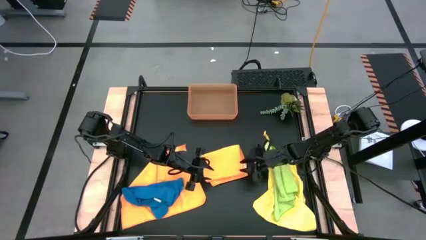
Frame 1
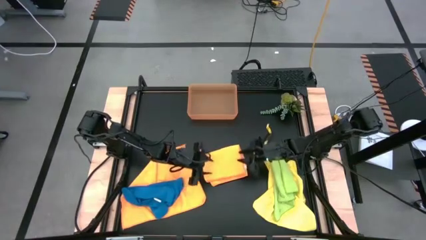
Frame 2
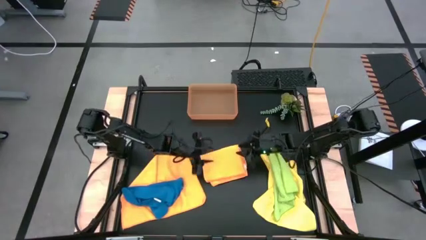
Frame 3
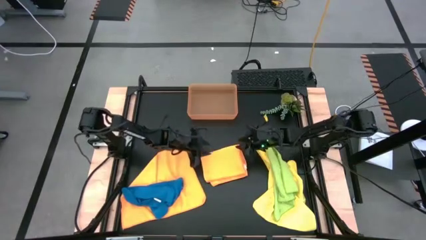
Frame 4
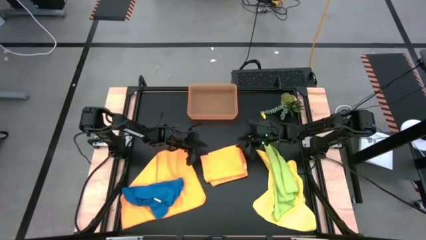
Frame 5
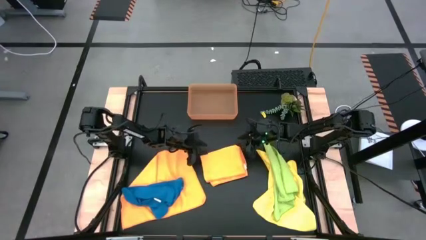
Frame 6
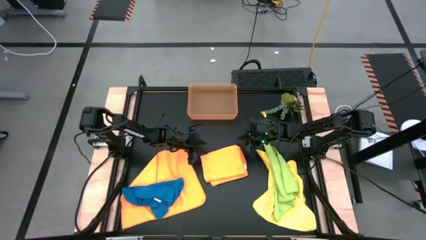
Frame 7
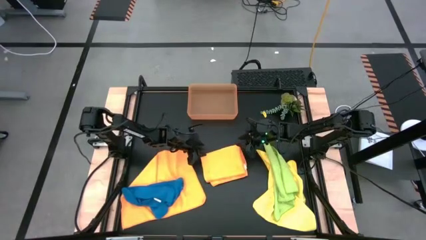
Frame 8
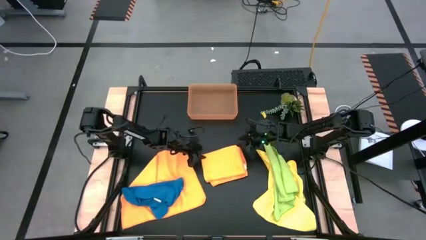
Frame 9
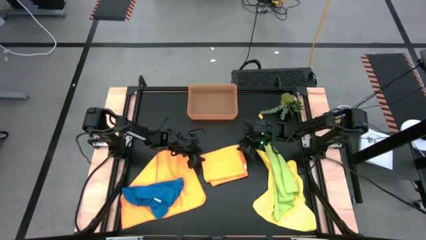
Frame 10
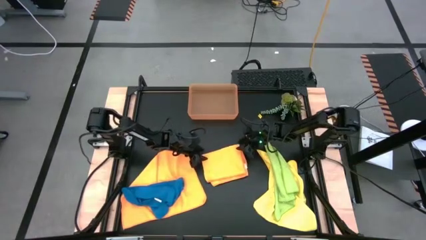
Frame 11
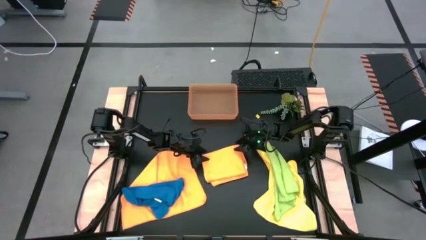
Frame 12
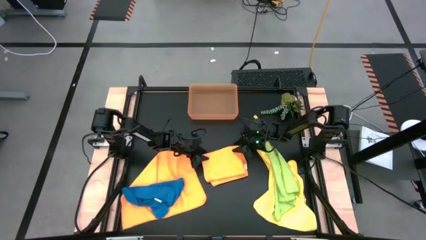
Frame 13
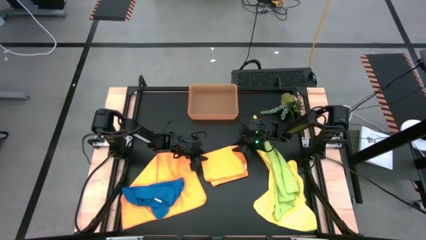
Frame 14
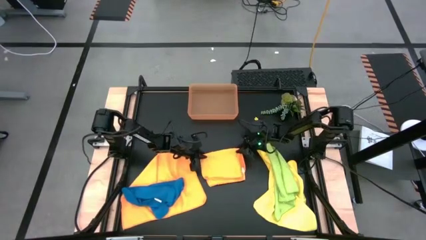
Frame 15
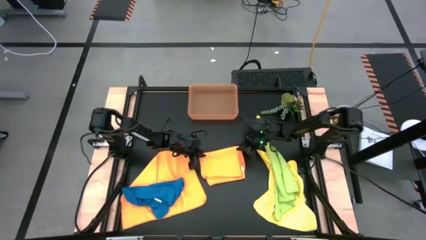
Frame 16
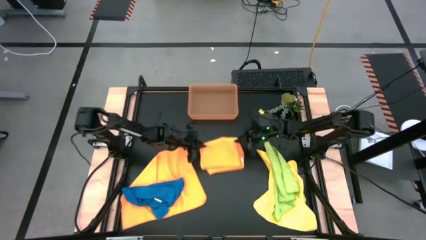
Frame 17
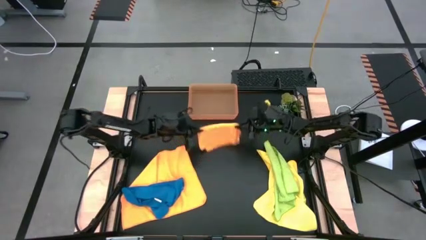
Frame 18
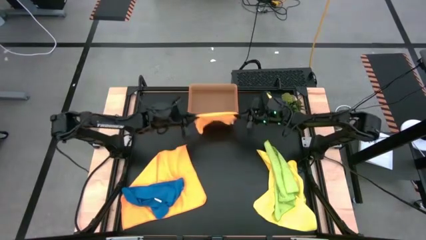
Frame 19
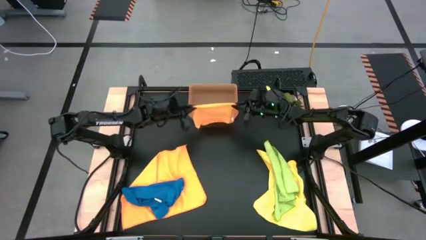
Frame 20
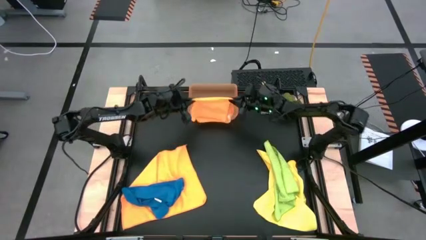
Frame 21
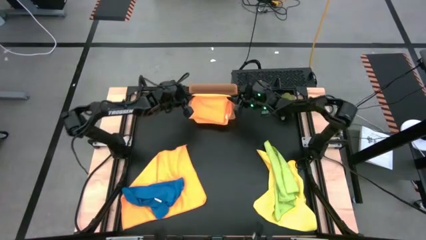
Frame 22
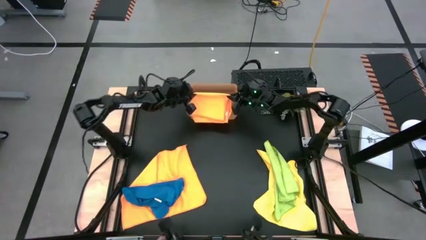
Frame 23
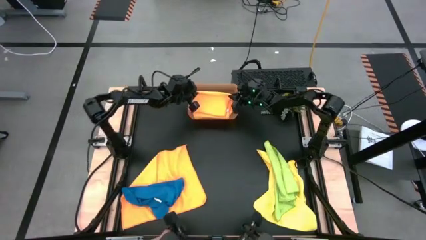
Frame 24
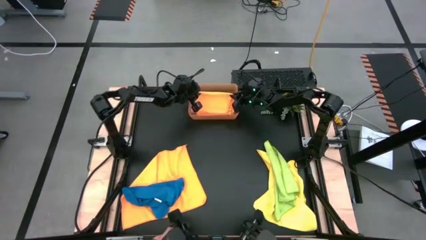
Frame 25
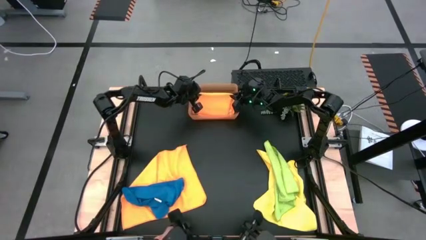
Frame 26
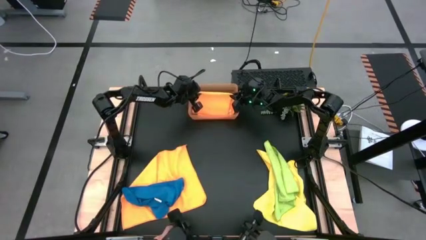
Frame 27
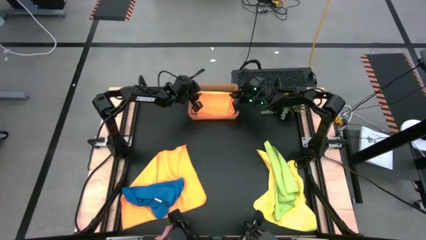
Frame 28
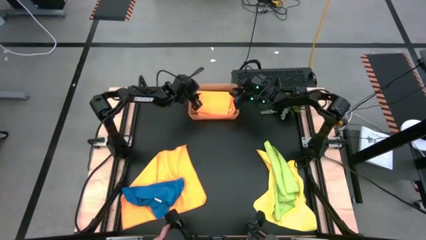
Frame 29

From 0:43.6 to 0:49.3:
Task: Fold microfiber towels
Put the folded orange towel into the orange bin

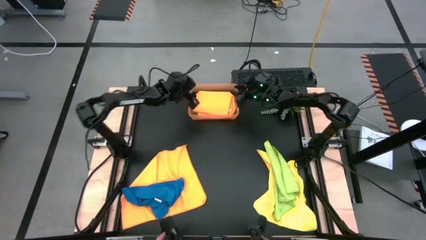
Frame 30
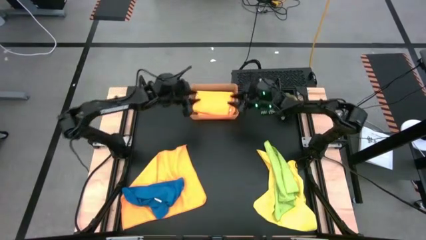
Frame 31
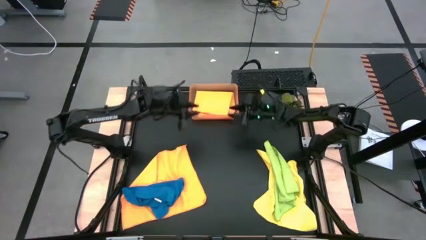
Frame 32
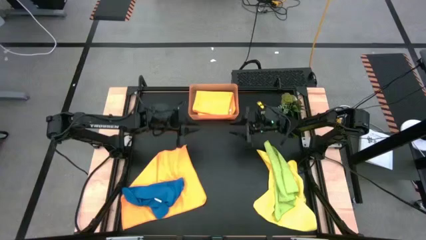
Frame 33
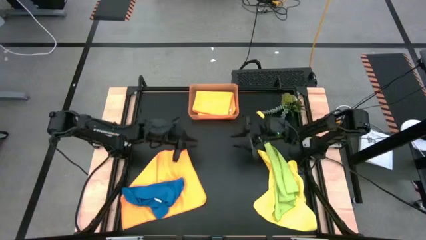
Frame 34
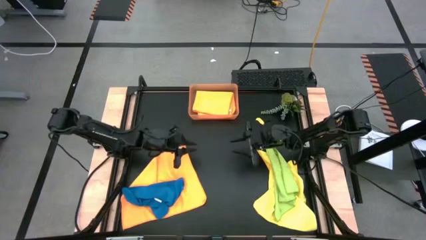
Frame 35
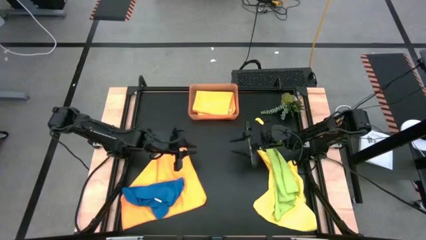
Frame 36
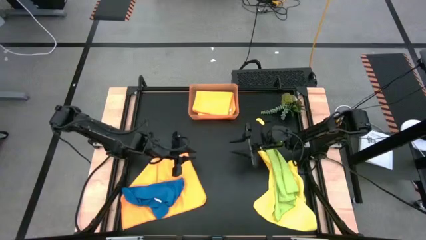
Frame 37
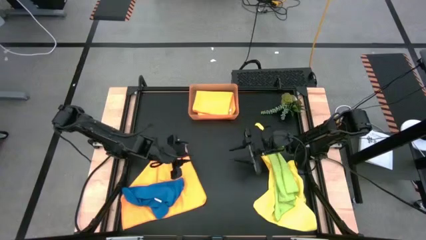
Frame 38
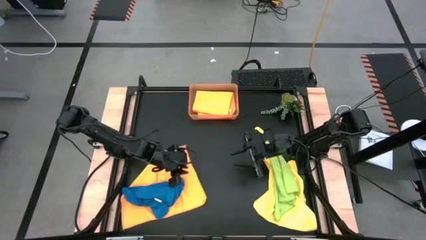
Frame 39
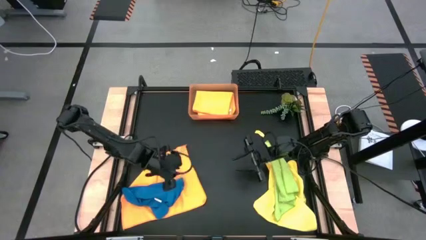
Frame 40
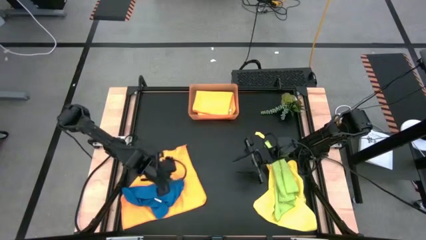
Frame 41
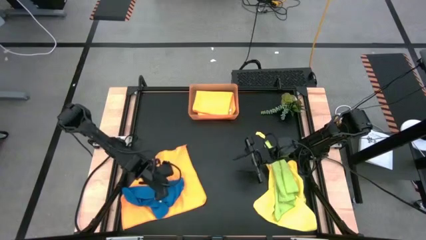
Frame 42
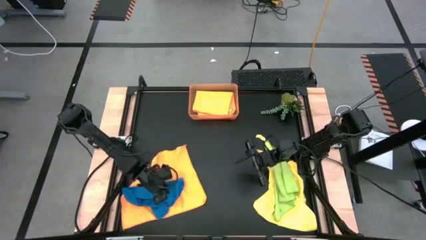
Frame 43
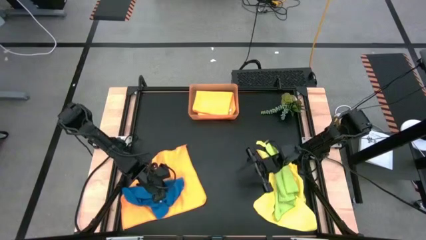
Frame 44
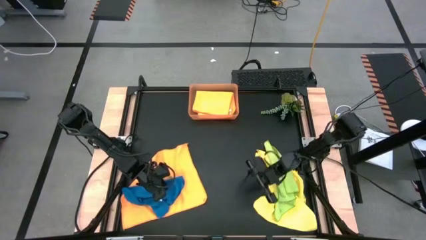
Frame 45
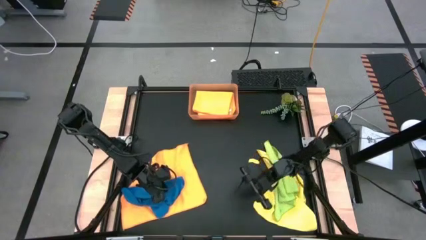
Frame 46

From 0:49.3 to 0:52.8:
Fold the blue towel

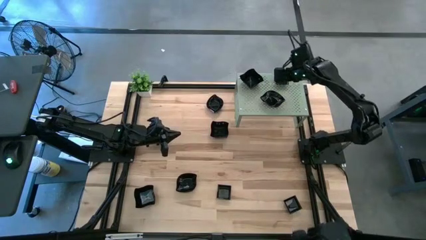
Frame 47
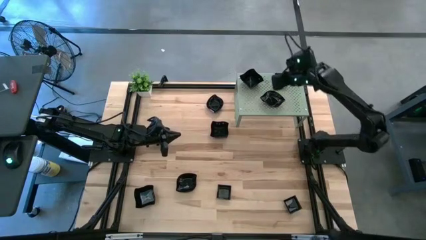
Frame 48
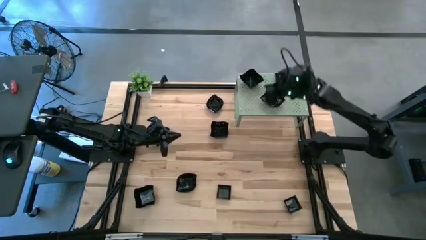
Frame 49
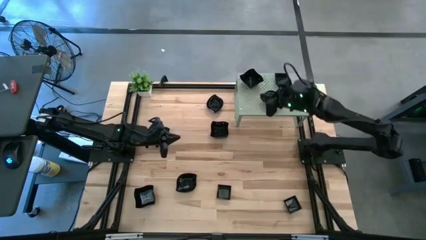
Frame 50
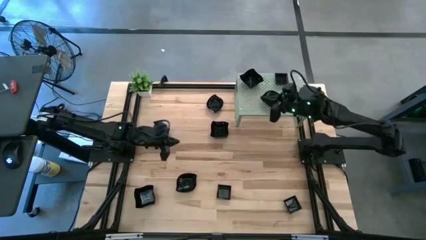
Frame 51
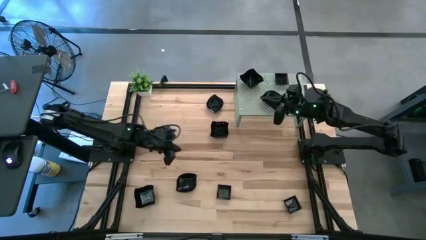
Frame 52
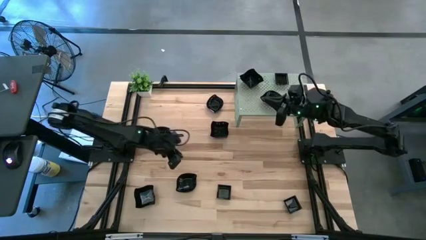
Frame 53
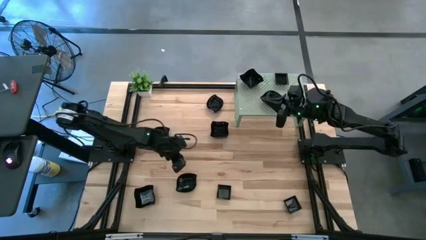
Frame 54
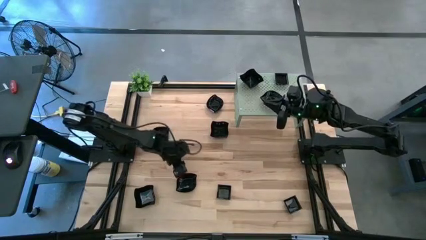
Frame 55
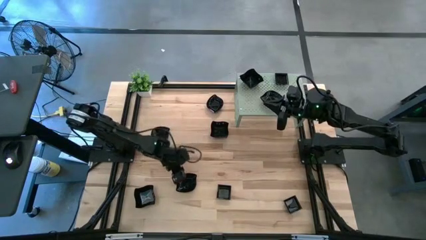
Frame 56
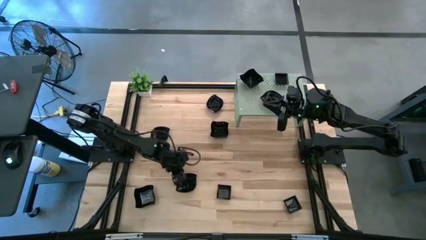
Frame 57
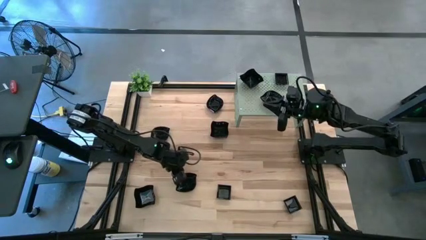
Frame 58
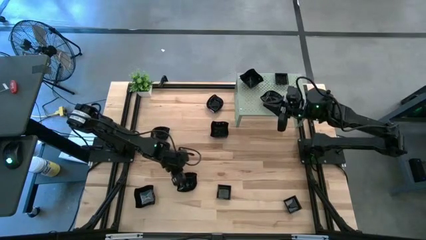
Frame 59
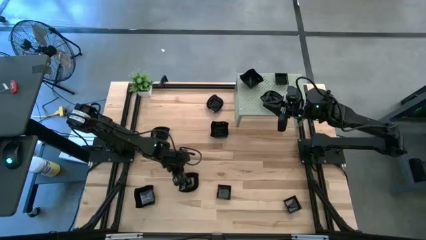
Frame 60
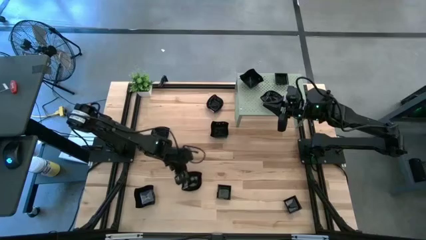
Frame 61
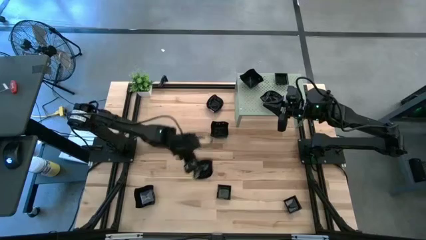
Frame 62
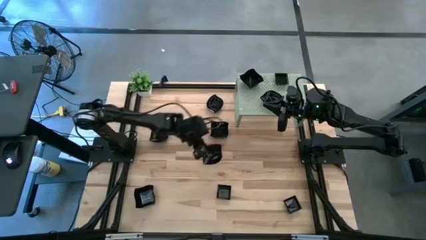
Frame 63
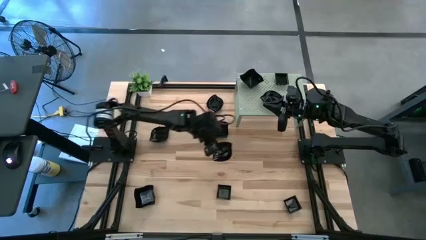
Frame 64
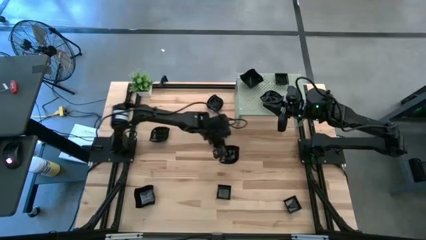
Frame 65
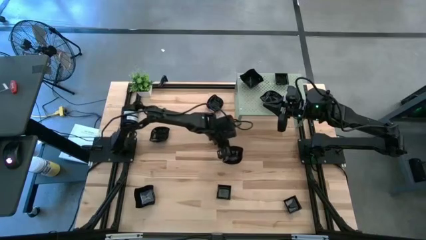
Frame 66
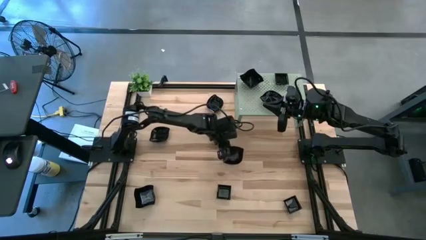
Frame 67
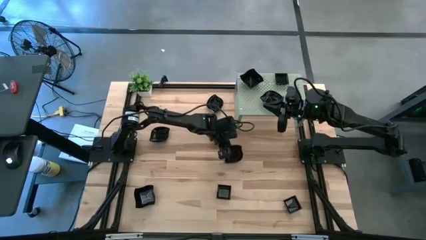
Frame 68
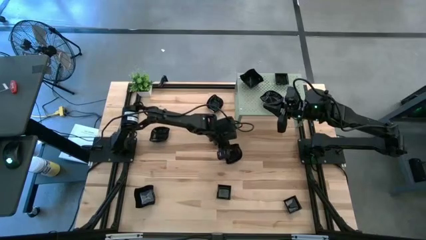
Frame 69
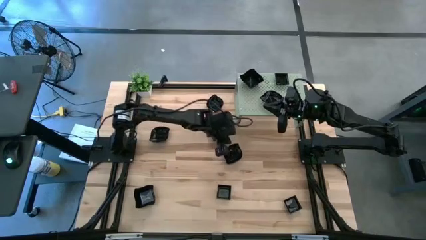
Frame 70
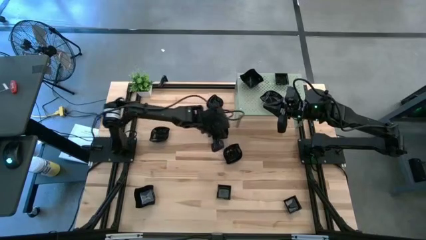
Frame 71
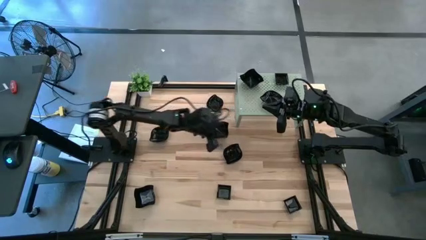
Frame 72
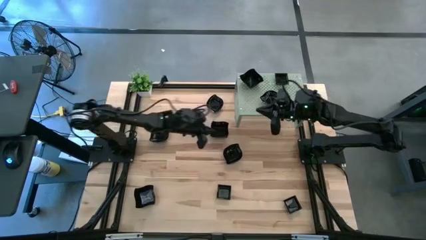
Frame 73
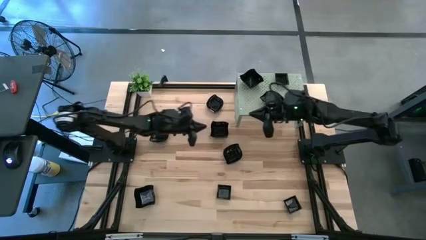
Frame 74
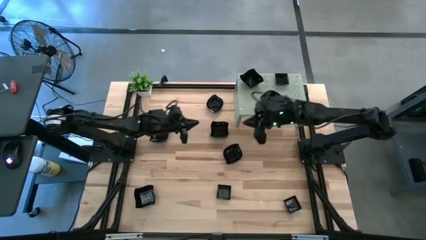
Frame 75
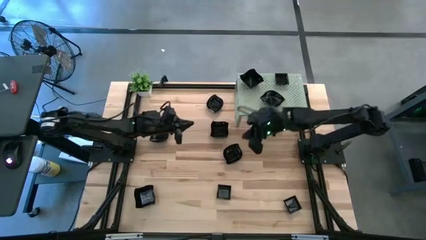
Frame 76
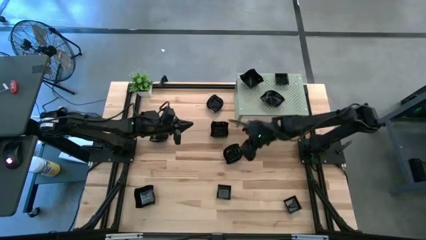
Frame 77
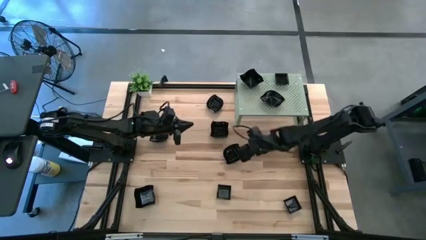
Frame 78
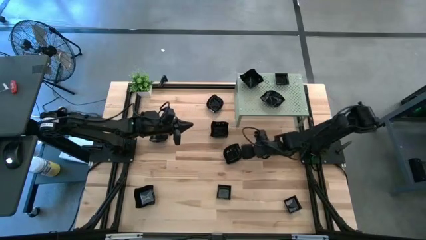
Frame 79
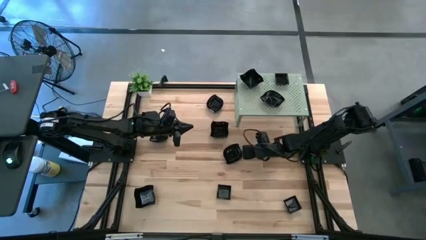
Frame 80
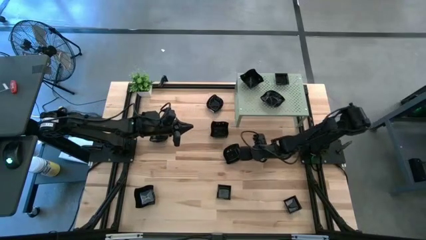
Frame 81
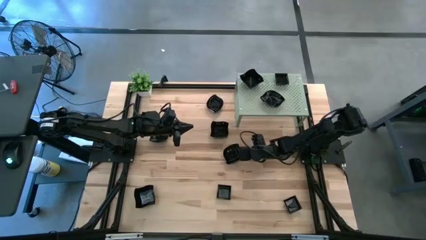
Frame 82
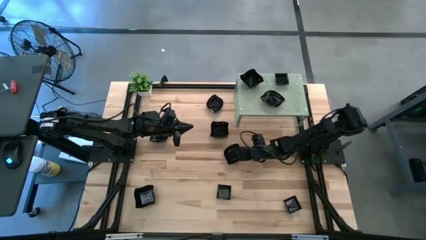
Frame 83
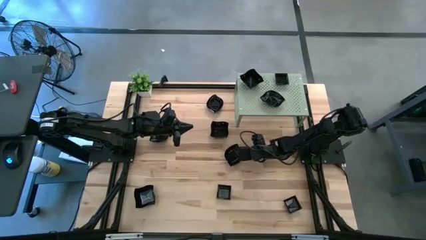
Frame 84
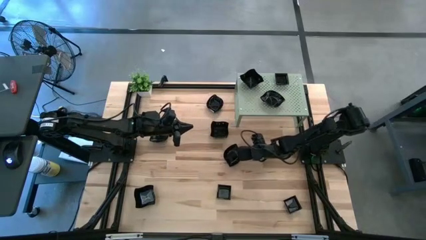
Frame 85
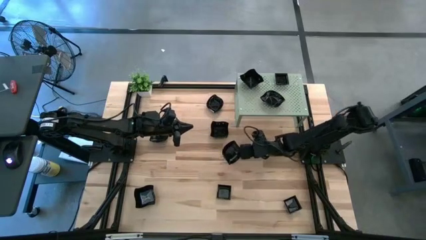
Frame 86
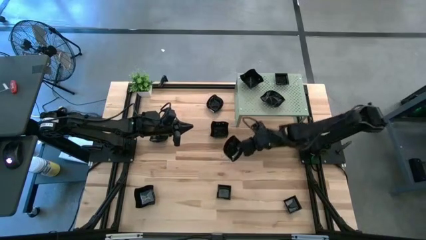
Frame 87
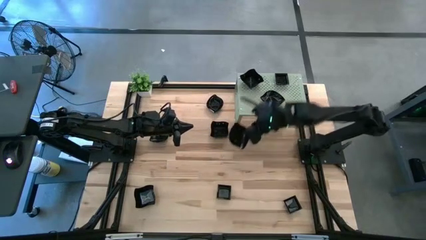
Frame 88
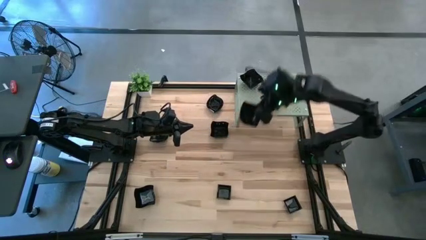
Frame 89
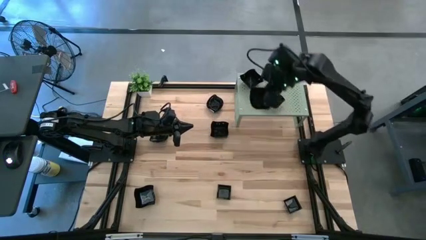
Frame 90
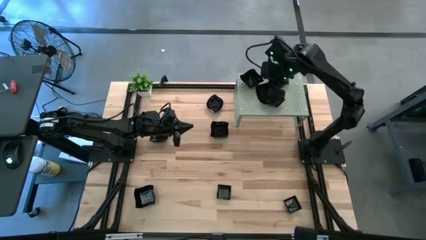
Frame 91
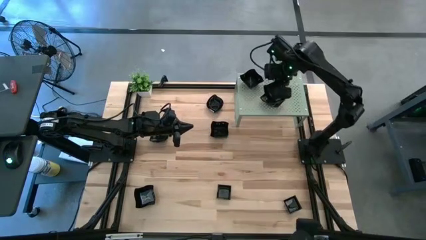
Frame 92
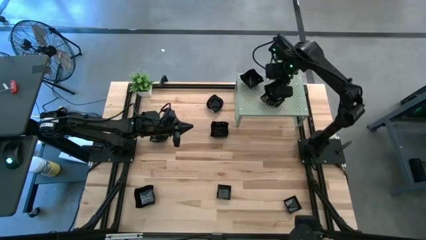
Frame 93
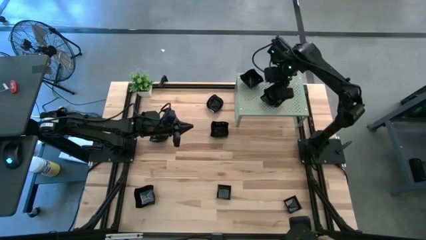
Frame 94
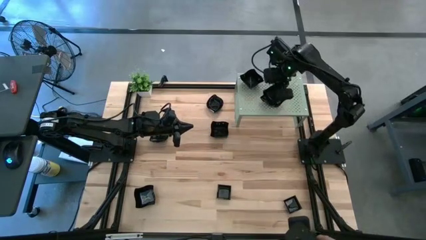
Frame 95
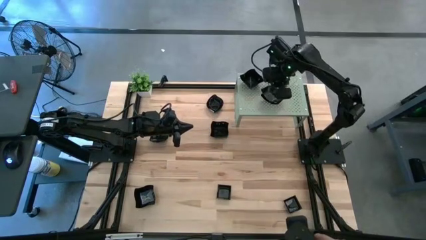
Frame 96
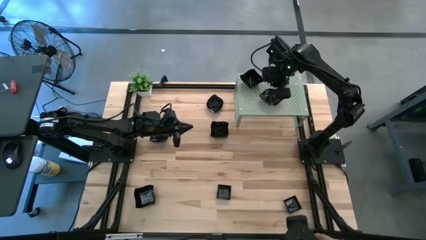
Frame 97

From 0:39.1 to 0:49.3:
Task: Pick & Place Mini shaped plates
Stack the leaf-shaped plate on top of the leaf-shaped plates on the shelf
